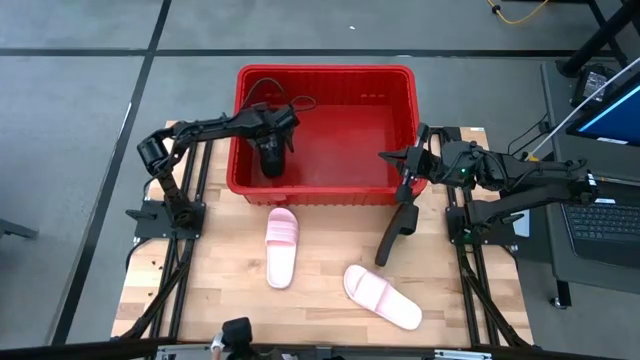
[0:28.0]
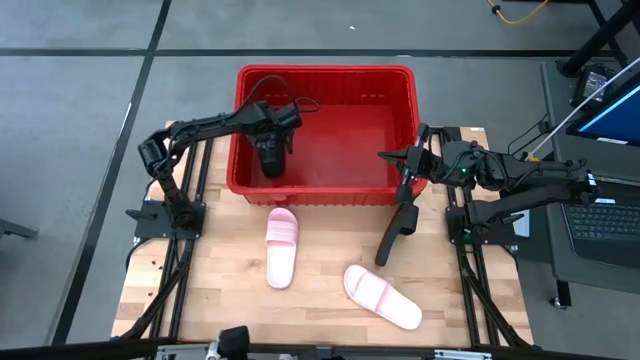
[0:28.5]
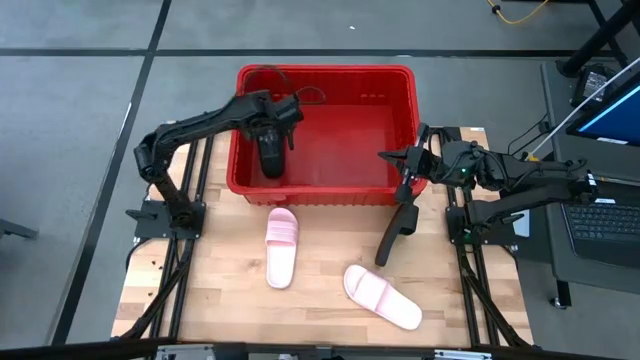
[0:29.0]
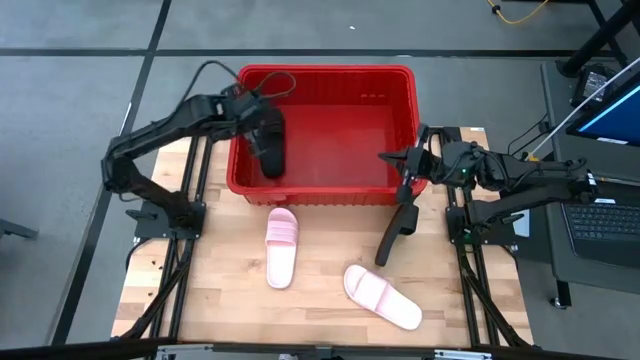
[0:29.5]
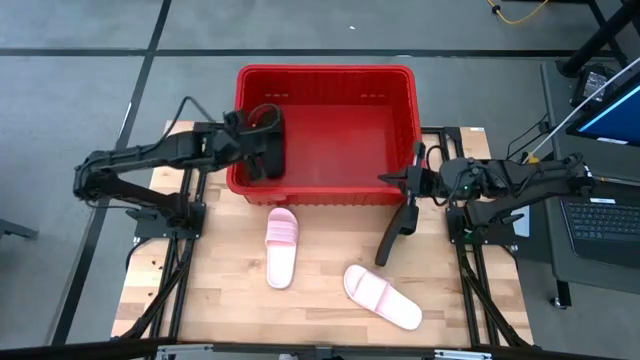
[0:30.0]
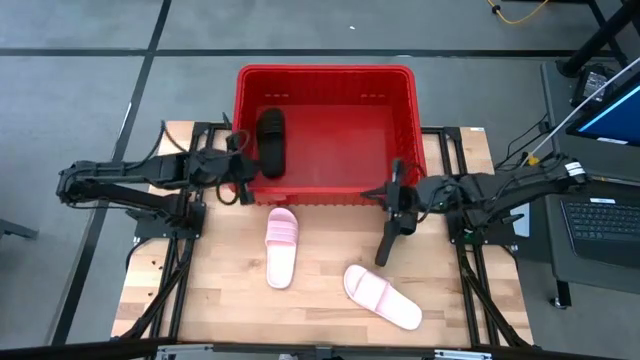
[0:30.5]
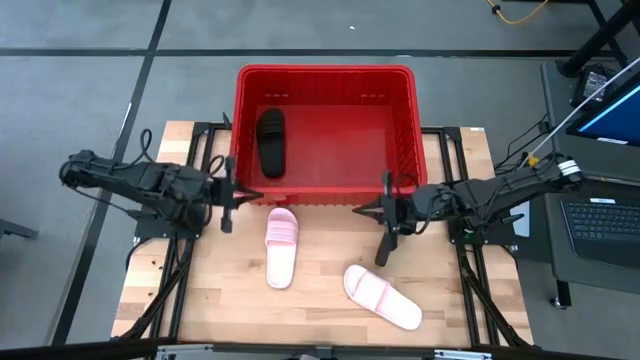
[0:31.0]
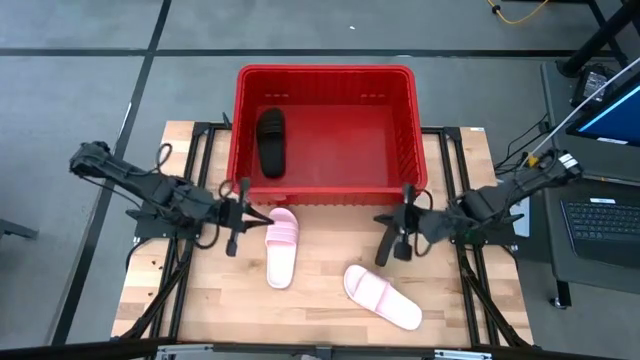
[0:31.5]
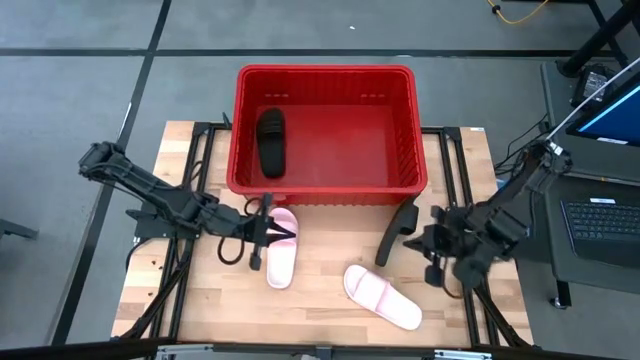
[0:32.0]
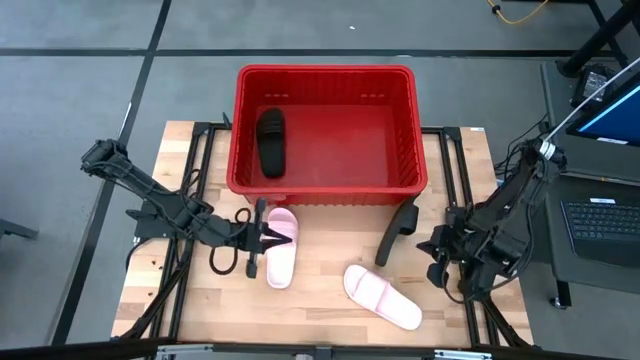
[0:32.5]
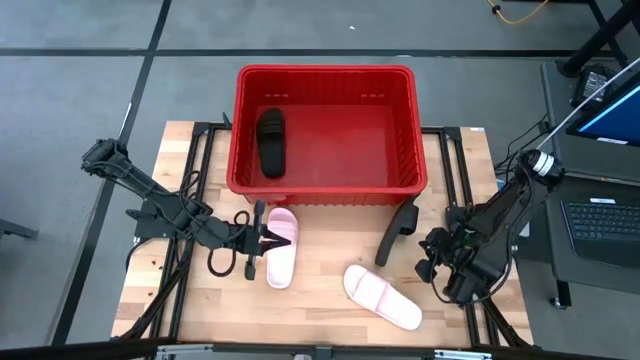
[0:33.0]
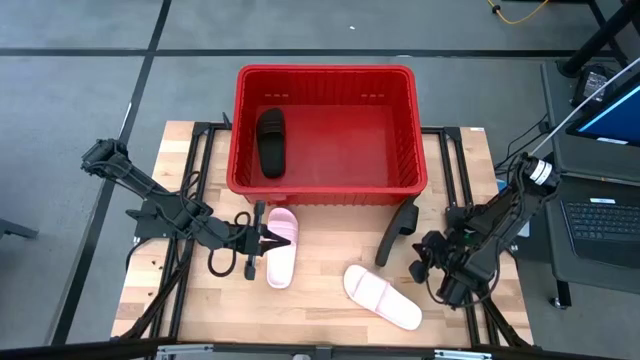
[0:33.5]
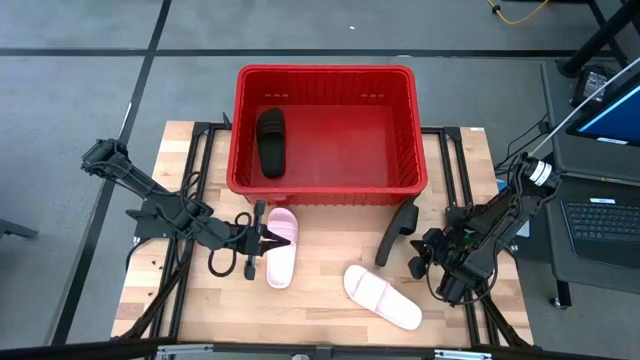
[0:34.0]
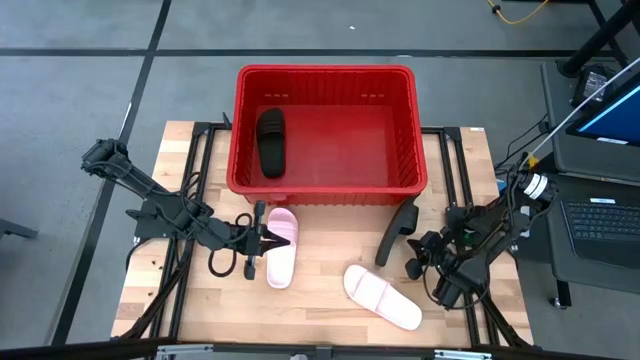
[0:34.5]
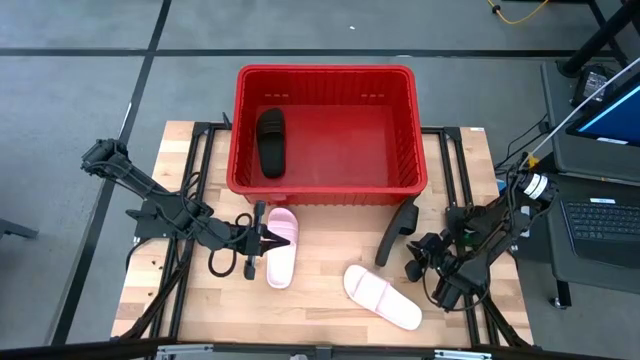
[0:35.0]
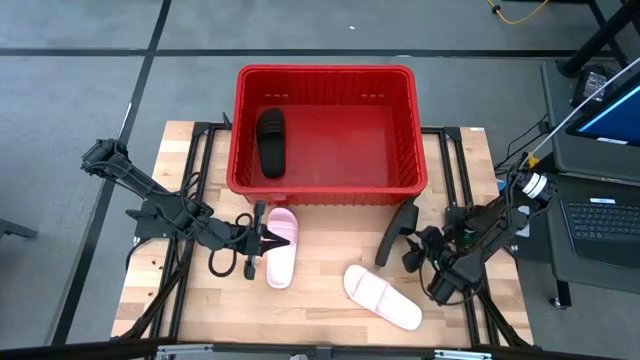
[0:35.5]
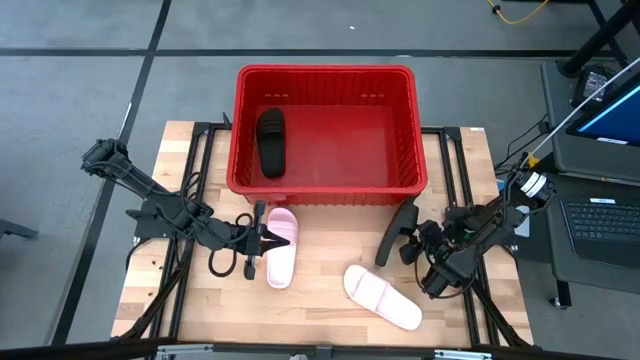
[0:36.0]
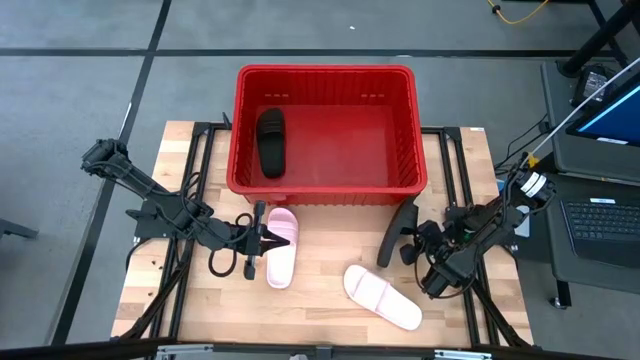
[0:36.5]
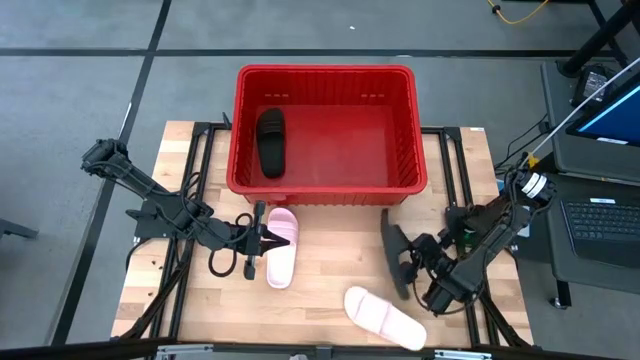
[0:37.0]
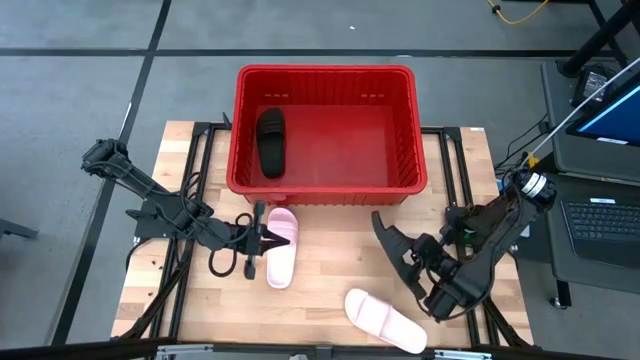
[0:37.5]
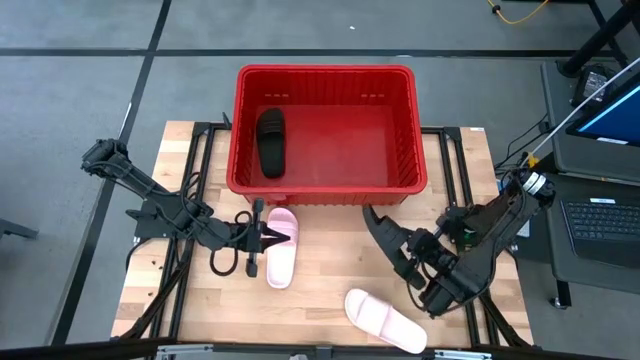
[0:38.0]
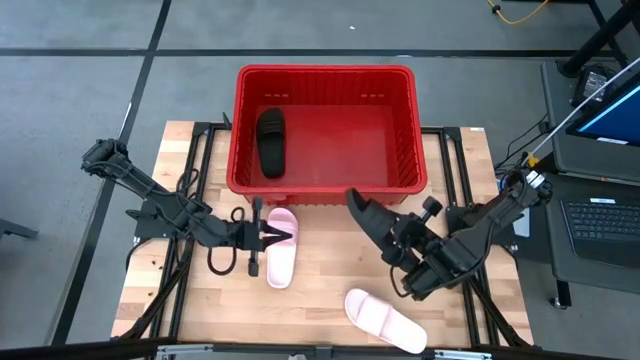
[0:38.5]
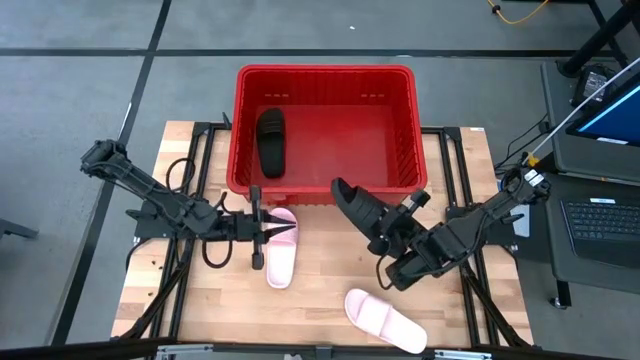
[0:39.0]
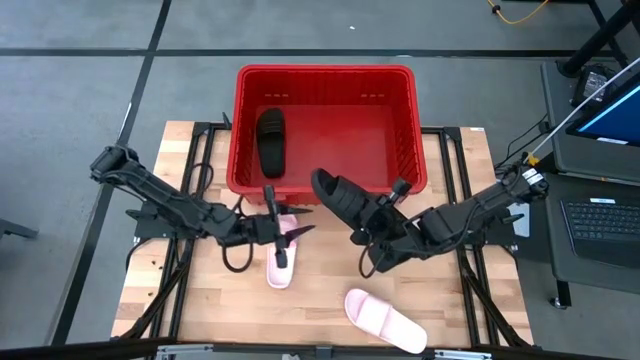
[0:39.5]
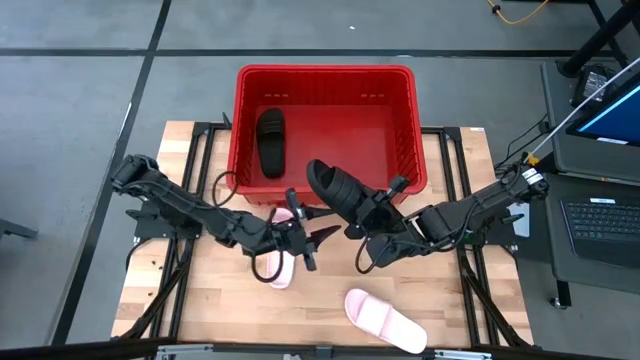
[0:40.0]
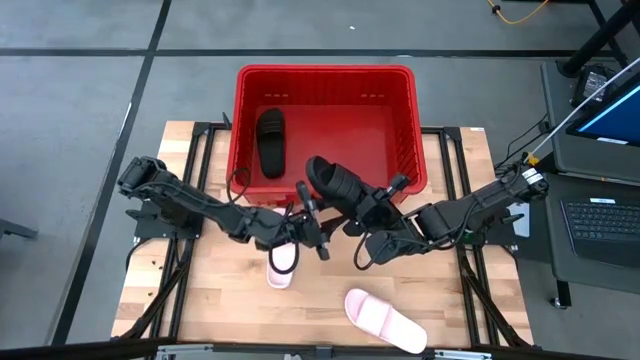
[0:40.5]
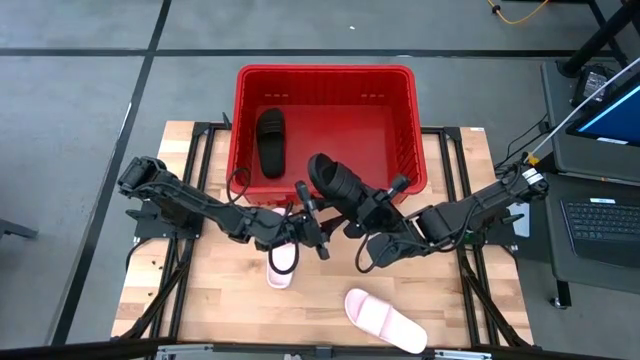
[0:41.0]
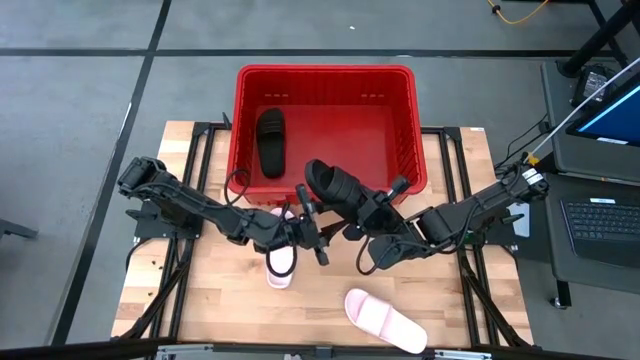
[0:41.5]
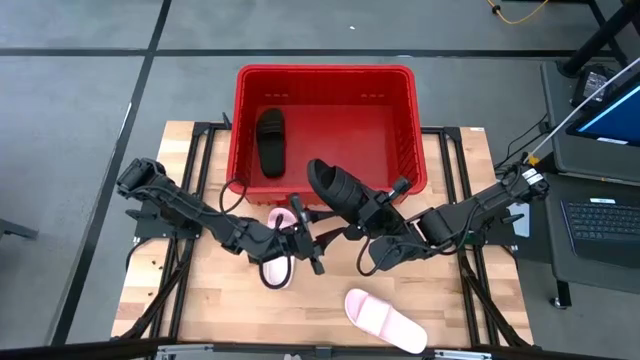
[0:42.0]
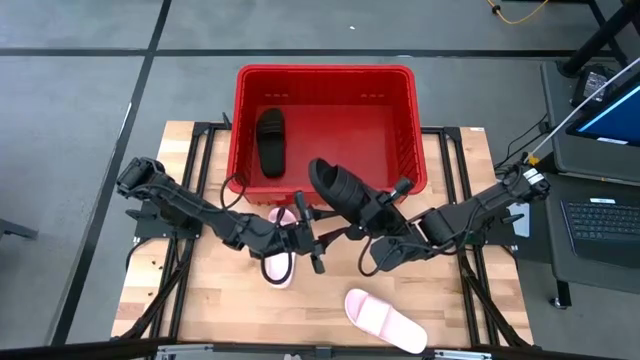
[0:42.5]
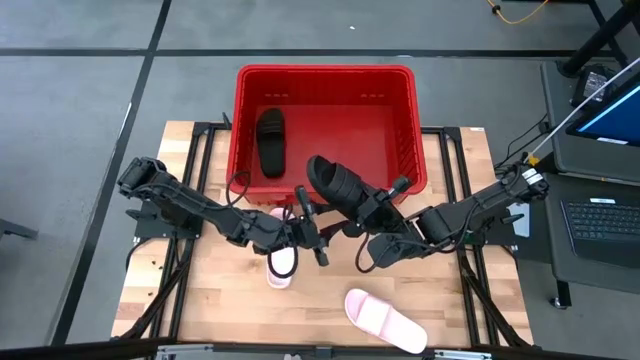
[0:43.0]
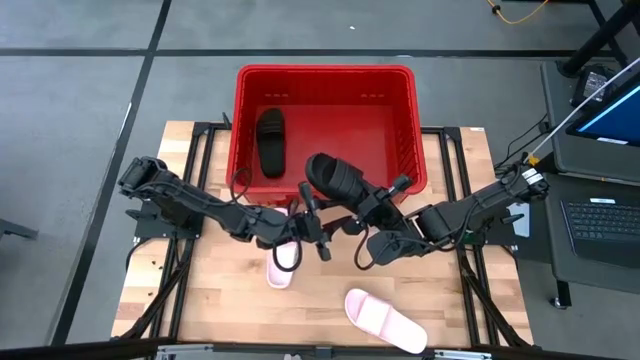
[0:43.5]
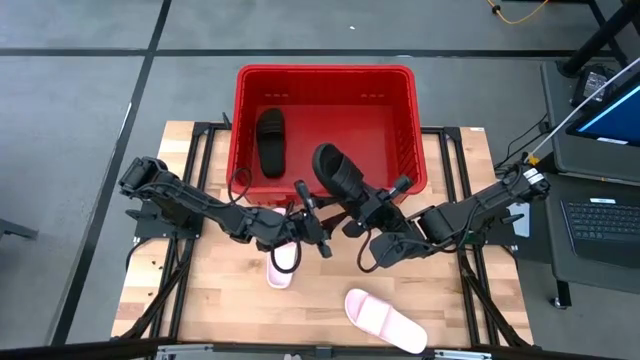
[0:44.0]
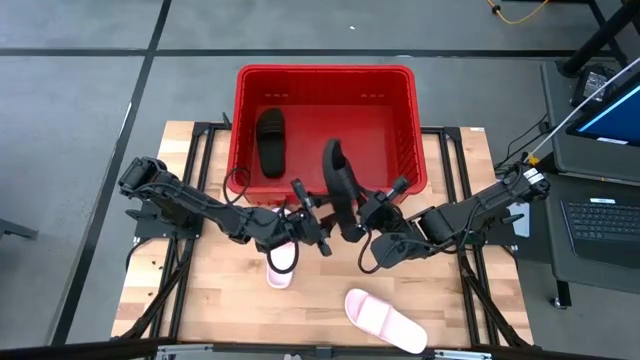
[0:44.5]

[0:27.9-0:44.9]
Task: Pick and place slides into bin
Put the black slipper into the red bin
